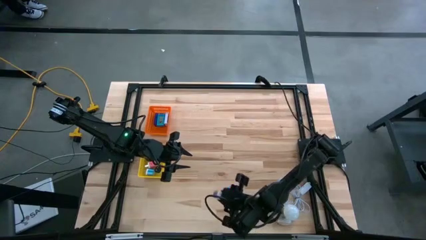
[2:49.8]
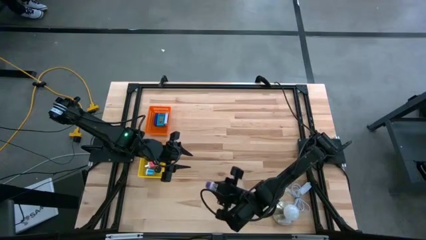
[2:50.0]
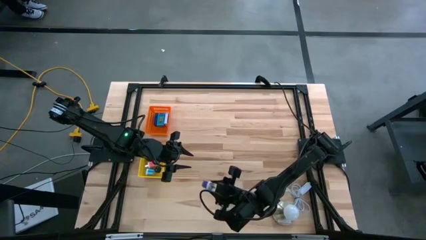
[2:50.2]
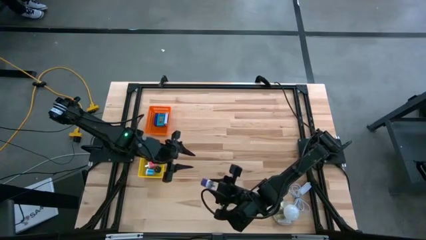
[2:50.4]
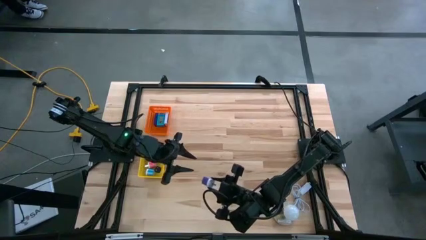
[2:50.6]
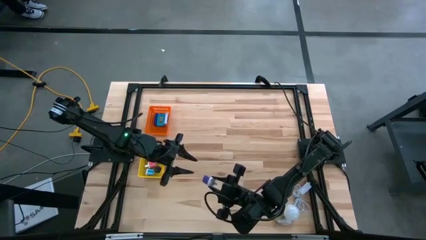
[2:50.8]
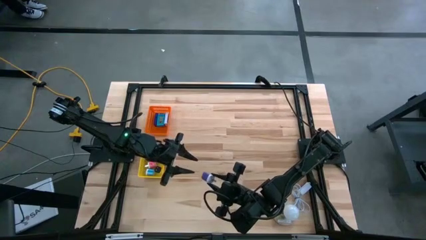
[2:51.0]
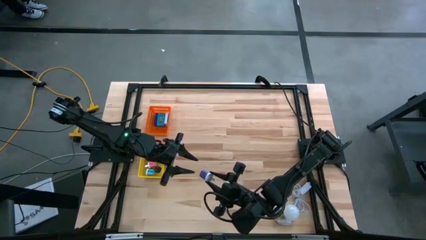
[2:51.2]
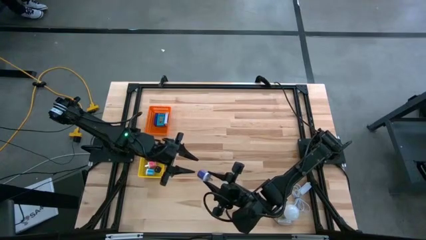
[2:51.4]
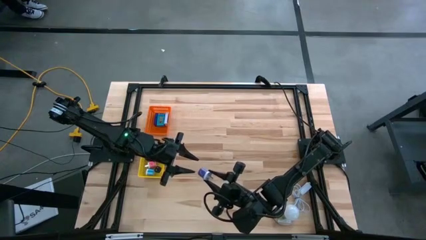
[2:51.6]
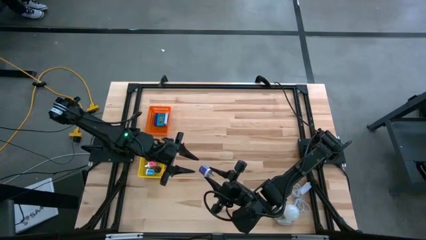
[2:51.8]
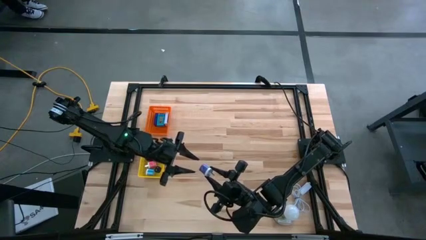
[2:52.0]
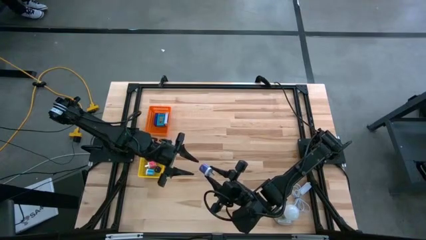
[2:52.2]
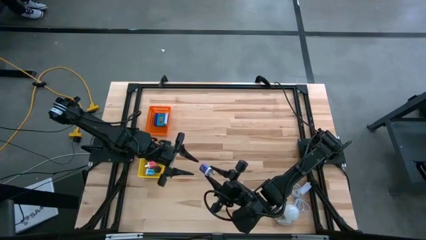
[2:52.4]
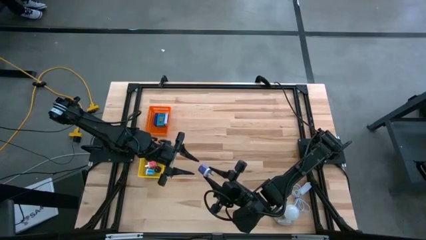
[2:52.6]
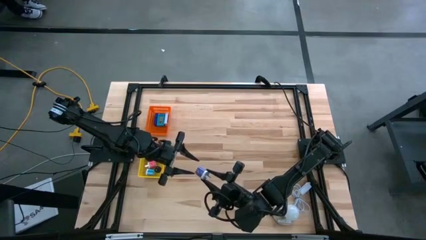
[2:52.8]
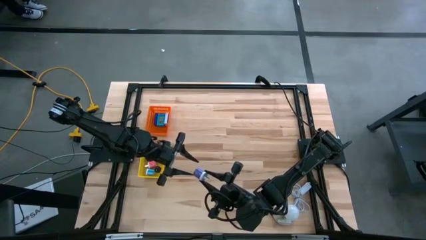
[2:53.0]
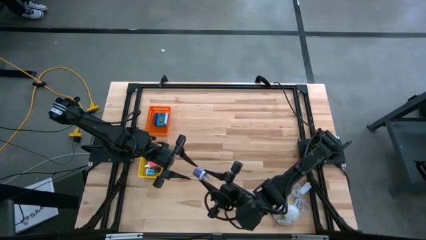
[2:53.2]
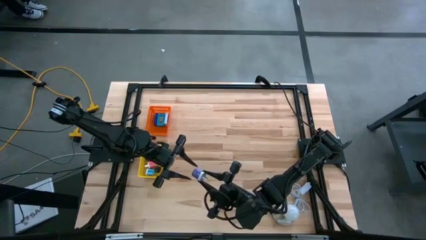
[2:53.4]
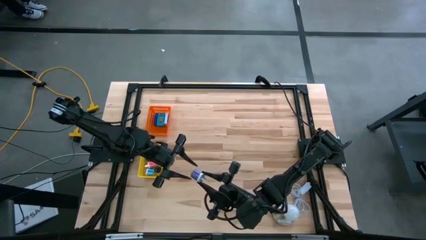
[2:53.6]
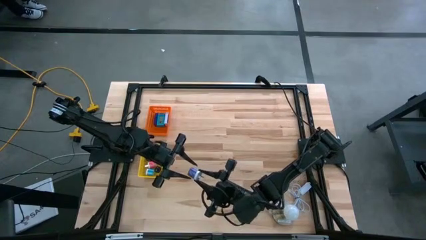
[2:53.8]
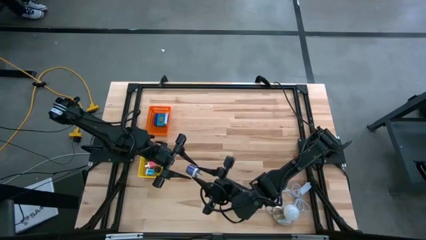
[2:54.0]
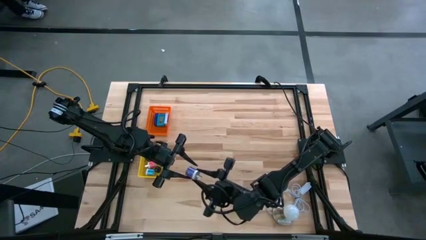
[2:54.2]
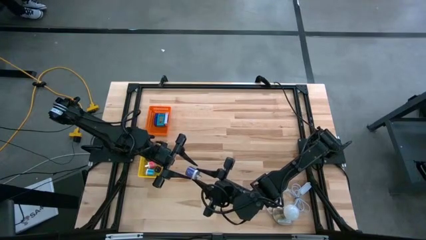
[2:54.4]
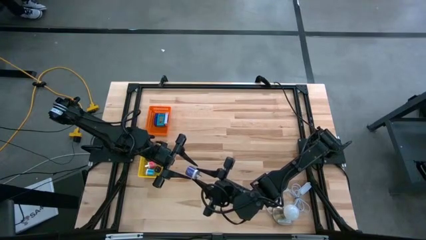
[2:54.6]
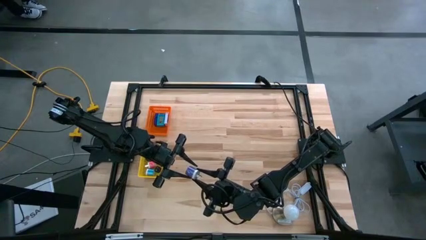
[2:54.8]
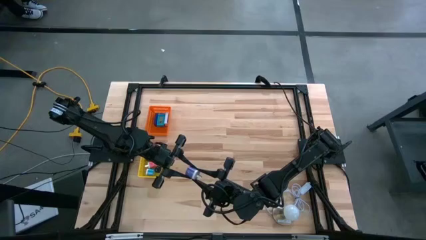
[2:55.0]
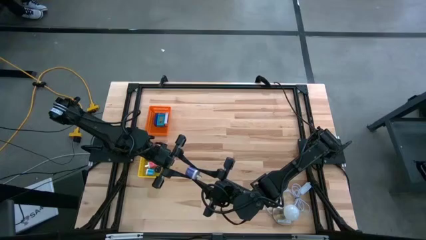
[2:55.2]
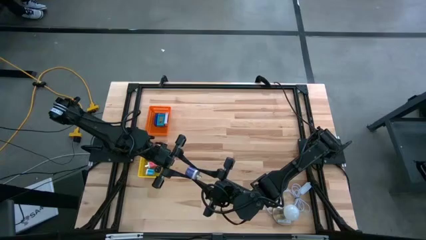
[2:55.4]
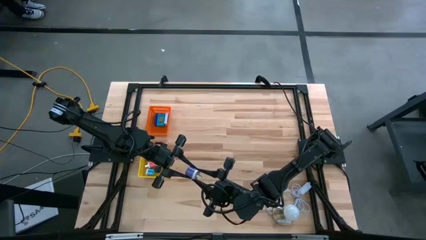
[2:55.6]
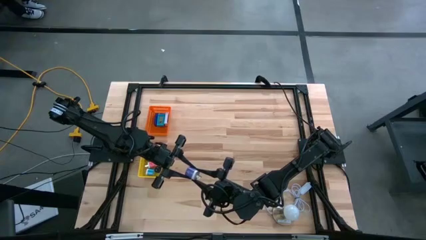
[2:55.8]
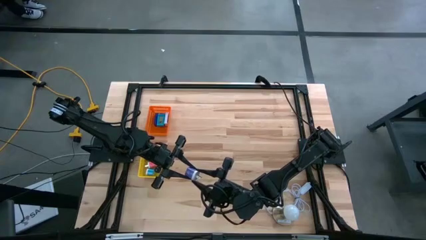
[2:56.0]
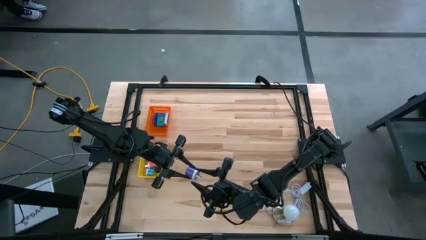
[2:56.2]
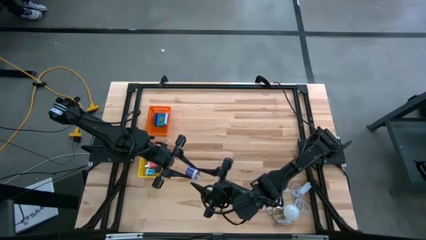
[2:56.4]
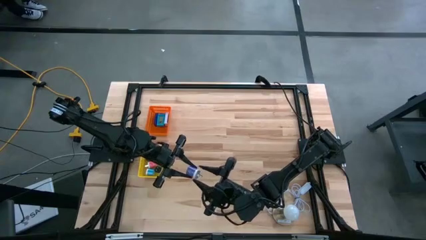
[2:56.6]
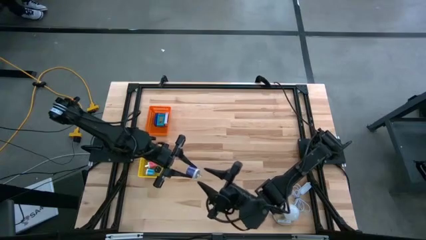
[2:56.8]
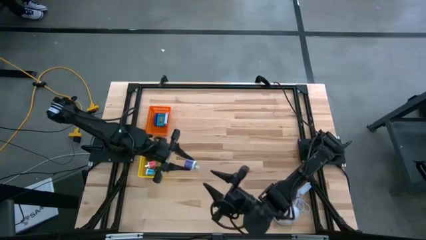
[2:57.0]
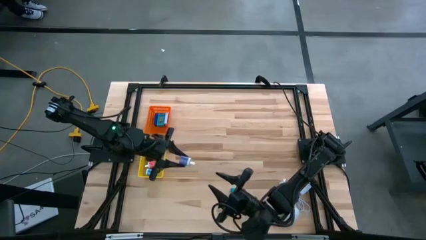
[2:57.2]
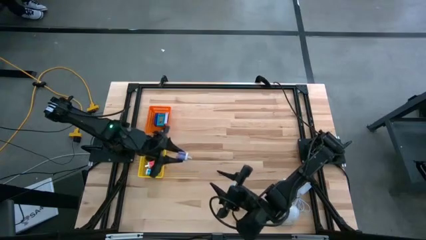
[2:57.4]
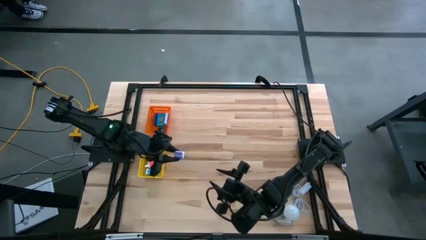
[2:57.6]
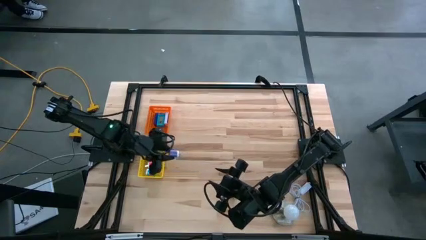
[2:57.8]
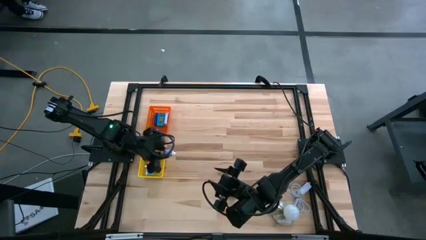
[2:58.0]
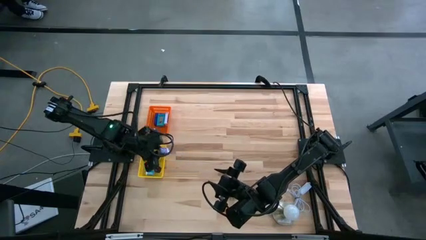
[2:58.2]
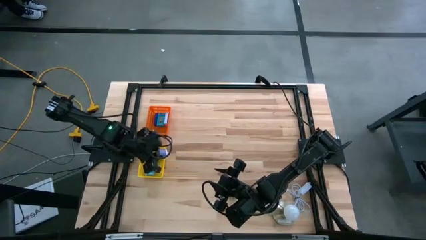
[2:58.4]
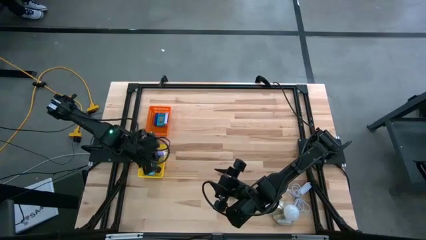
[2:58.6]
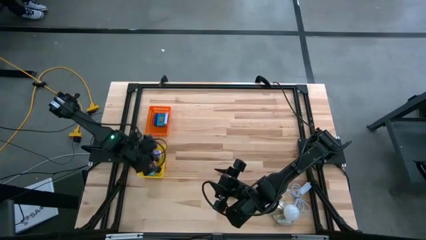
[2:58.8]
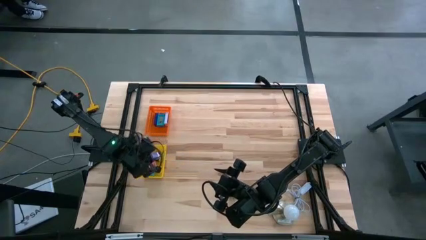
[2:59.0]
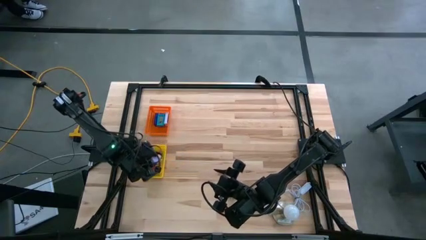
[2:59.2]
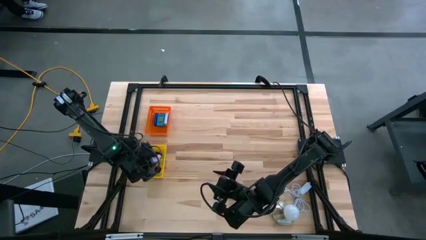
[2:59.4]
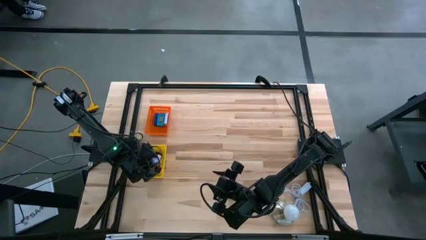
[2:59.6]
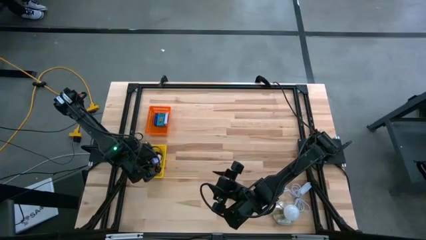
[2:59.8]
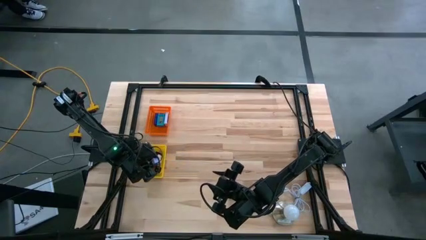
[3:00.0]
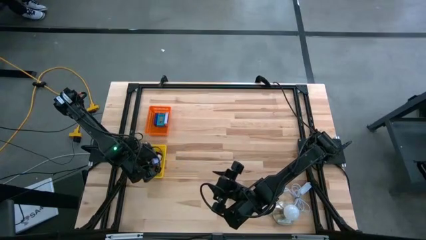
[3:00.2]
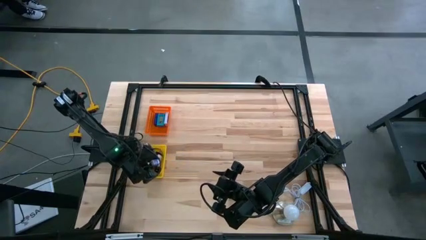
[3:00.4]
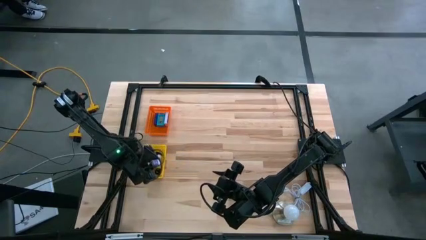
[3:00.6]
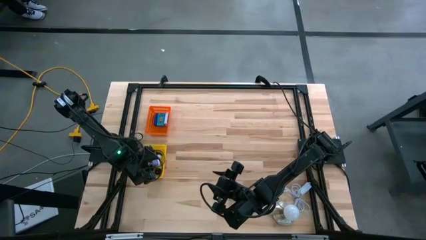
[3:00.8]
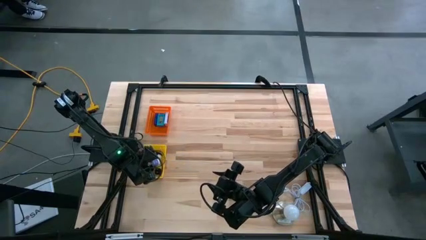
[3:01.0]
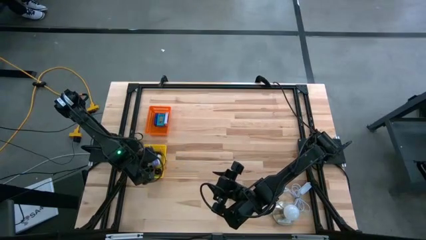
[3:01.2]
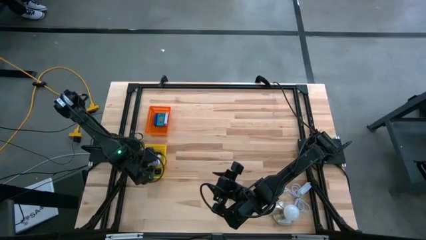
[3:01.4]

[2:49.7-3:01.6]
Task: Pick & Place Office items
Put the purple charger adapter into the yellow basket

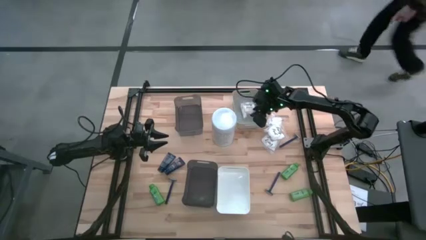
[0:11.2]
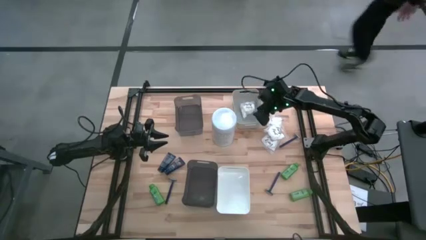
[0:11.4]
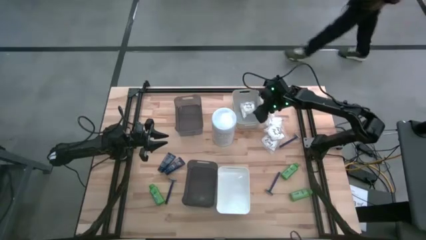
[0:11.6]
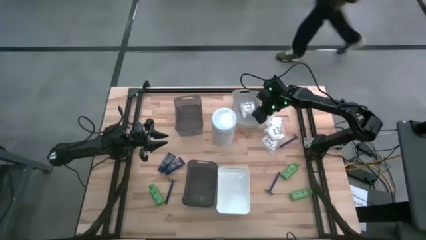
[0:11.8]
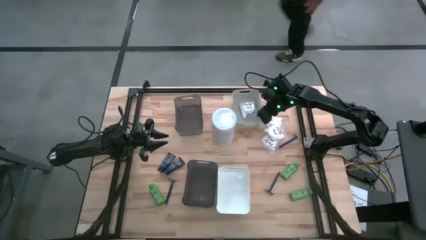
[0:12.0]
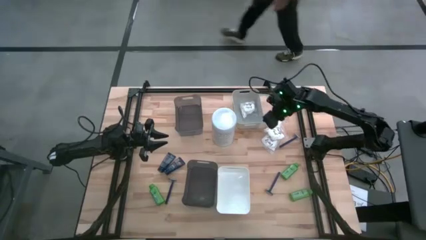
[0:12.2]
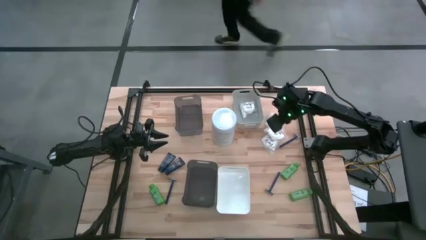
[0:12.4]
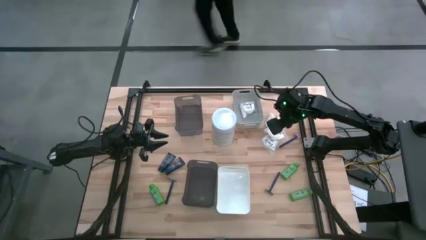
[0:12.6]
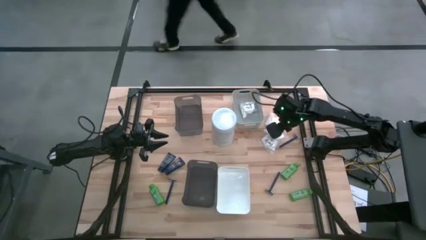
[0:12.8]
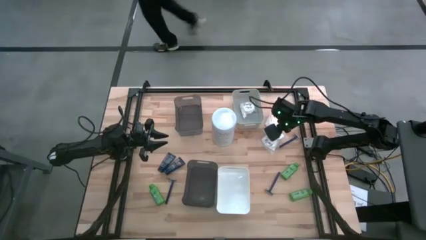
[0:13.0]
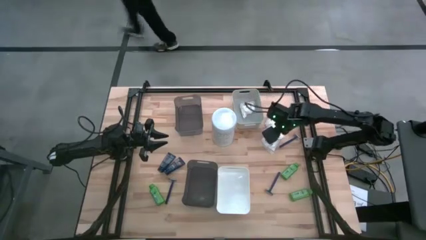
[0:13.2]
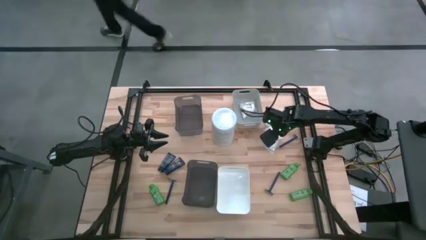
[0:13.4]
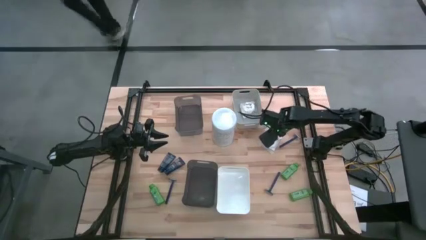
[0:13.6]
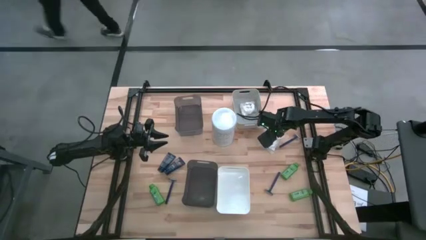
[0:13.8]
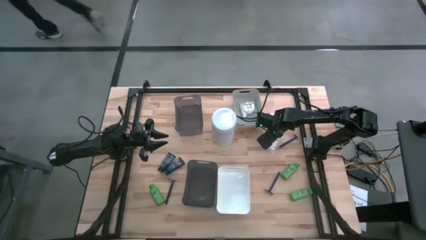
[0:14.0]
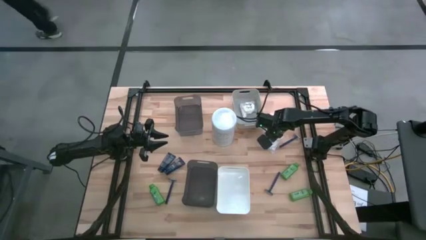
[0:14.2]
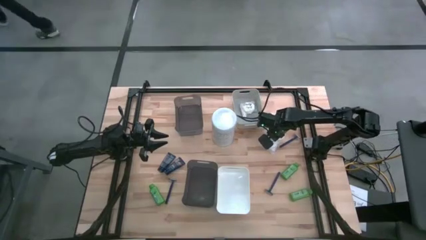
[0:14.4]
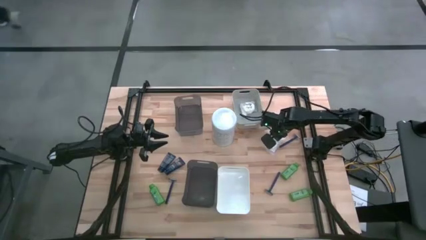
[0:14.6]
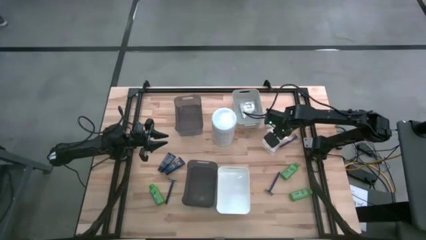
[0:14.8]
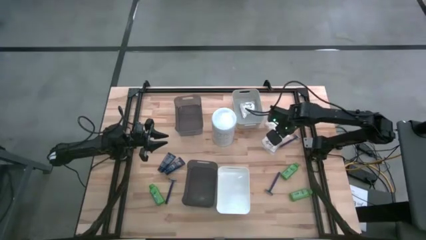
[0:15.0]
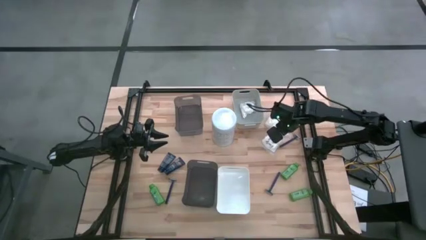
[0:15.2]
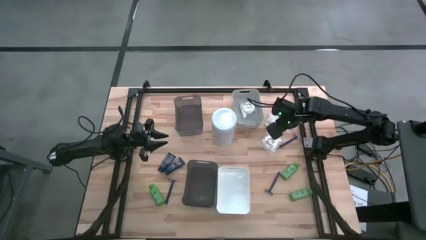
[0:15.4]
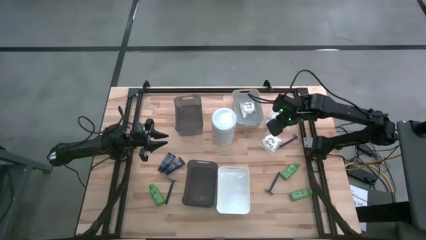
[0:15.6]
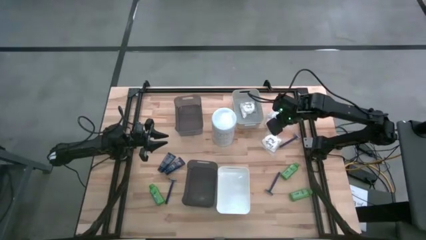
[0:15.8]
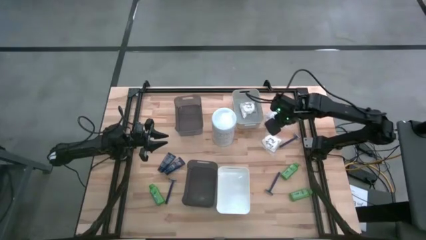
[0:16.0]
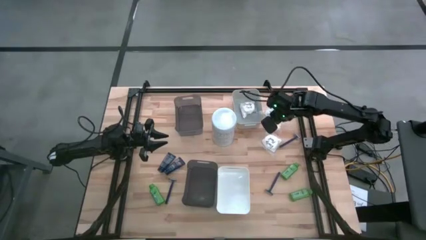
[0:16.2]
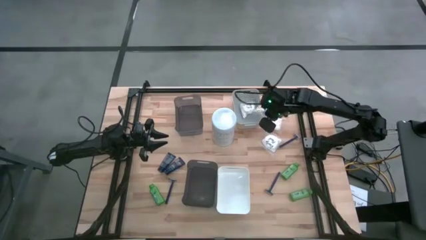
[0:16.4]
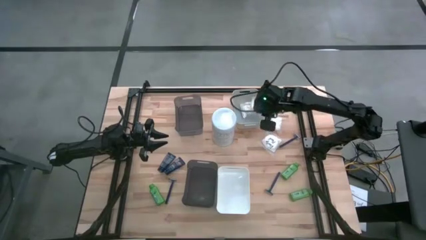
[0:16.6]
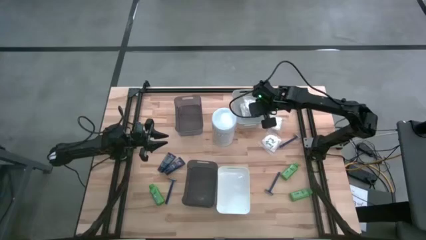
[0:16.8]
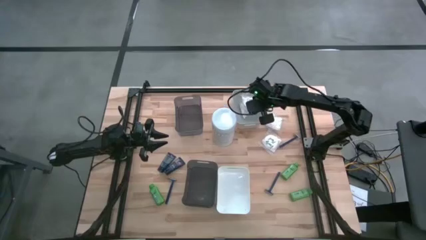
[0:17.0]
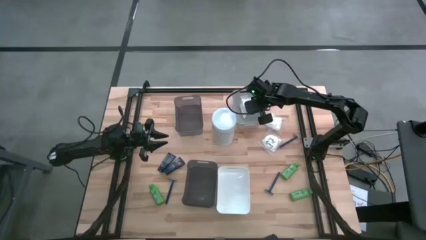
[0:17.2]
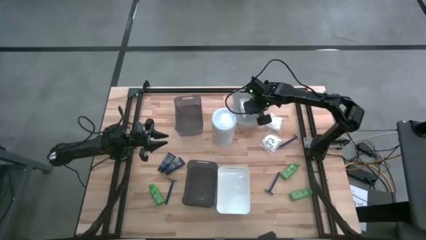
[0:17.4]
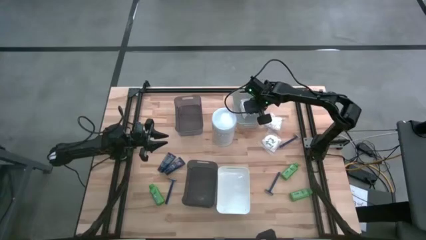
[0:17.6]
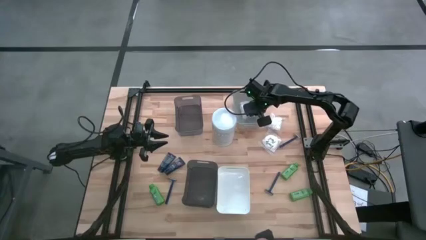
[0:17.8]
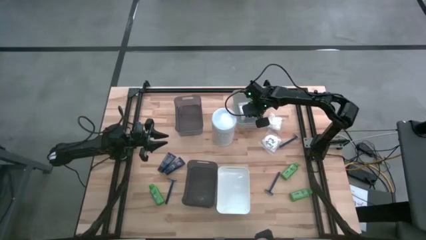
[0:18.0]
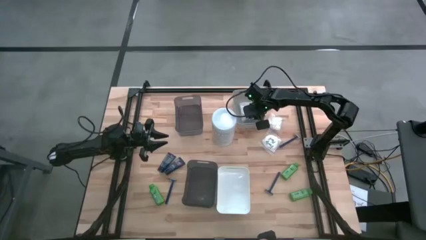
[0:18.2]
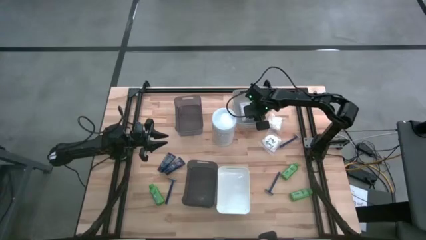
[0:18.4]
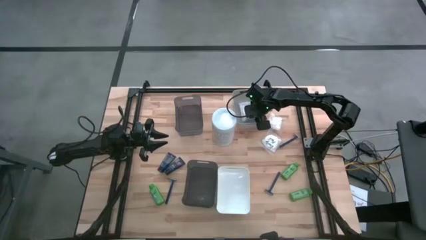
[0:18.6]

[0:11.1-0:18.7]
Task: Pick & Place Travel size toiletries
Put the white cotton pack into the gray bin
